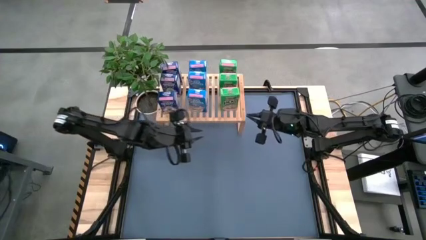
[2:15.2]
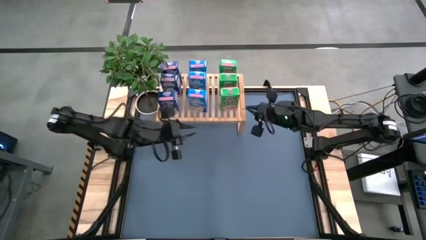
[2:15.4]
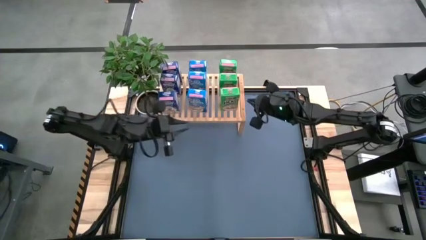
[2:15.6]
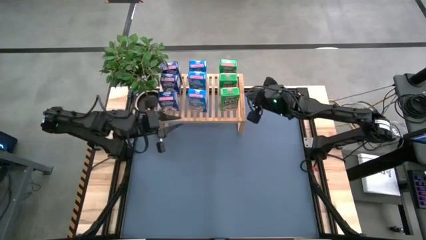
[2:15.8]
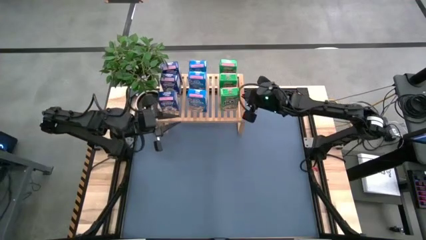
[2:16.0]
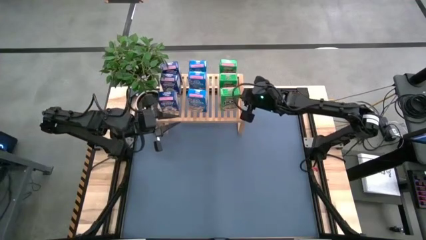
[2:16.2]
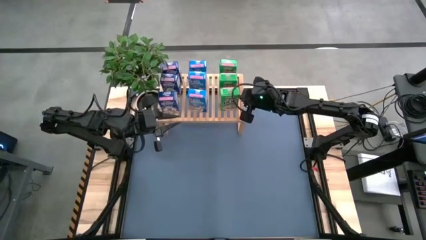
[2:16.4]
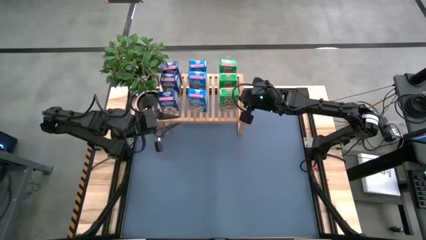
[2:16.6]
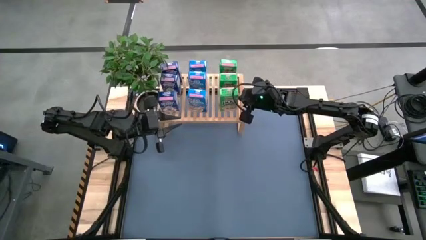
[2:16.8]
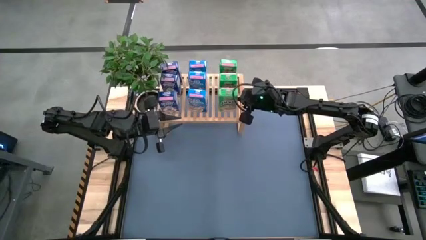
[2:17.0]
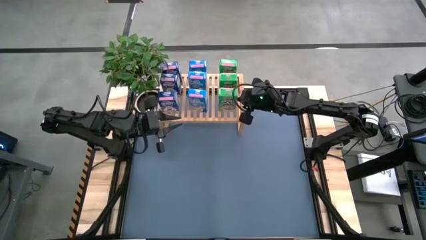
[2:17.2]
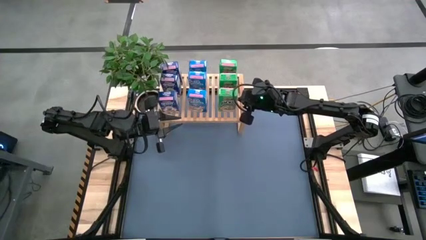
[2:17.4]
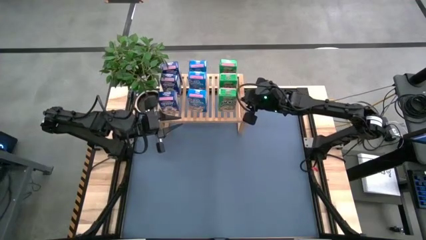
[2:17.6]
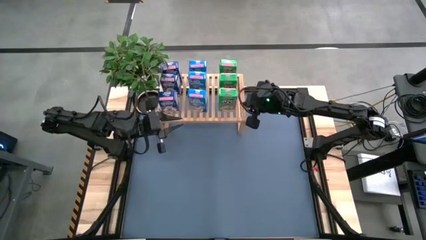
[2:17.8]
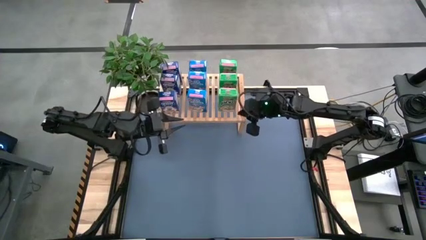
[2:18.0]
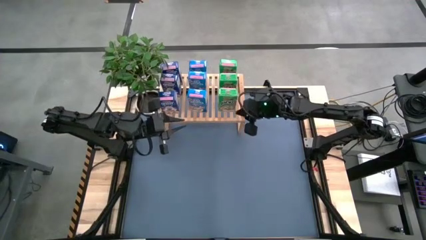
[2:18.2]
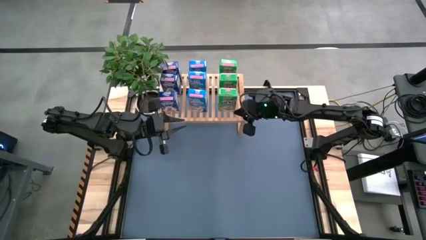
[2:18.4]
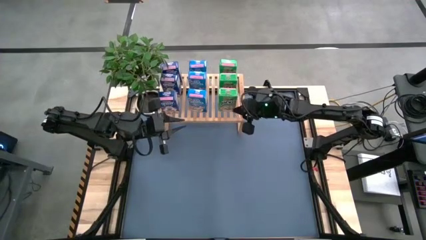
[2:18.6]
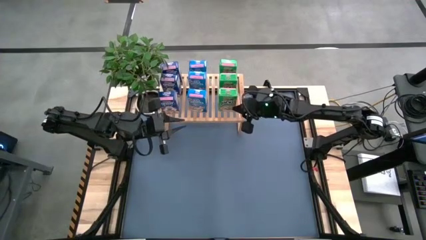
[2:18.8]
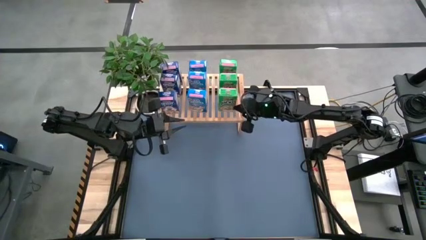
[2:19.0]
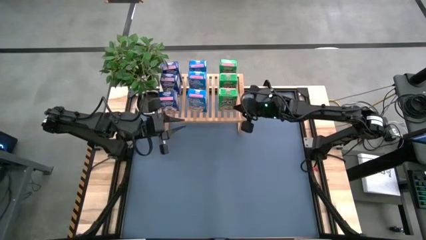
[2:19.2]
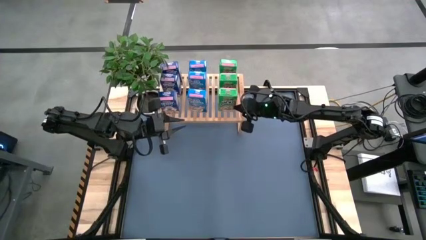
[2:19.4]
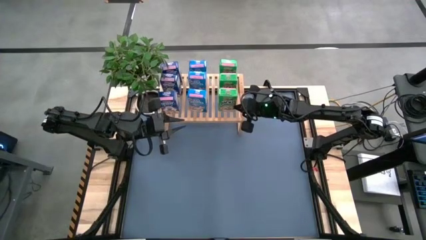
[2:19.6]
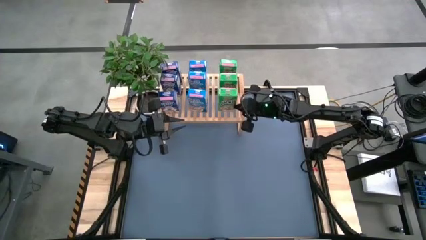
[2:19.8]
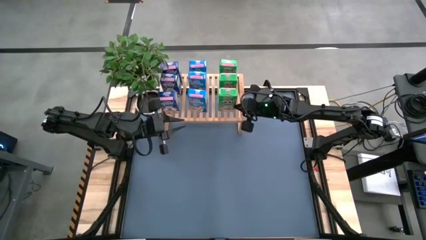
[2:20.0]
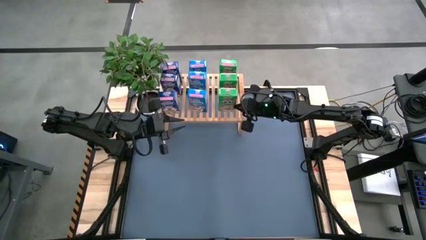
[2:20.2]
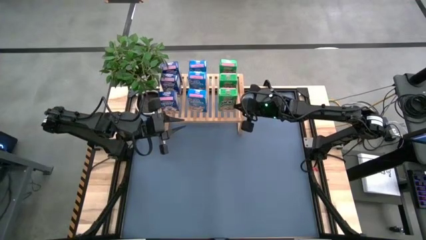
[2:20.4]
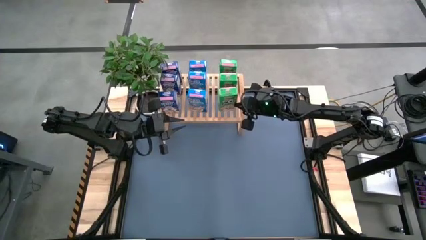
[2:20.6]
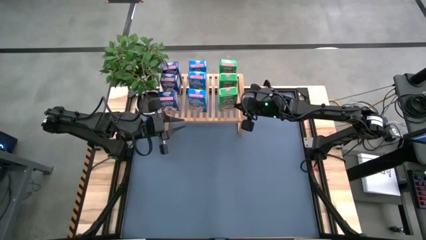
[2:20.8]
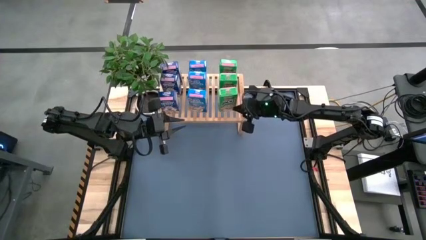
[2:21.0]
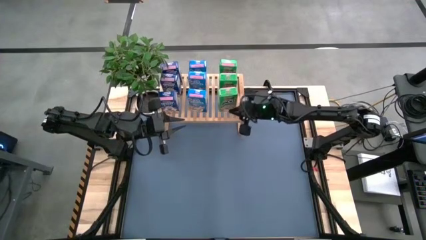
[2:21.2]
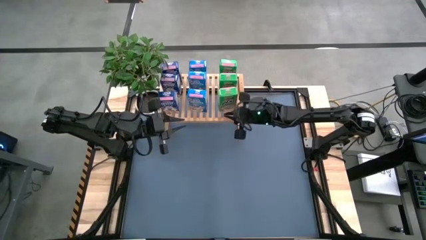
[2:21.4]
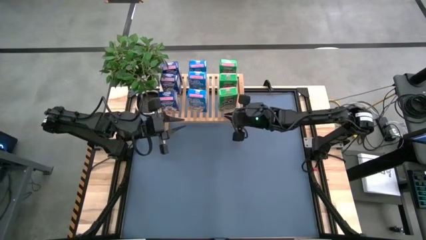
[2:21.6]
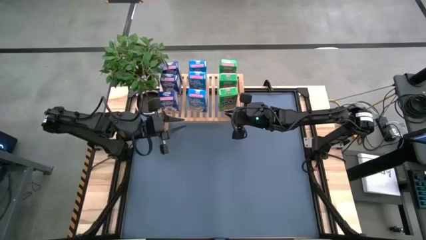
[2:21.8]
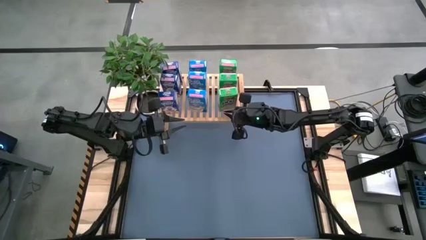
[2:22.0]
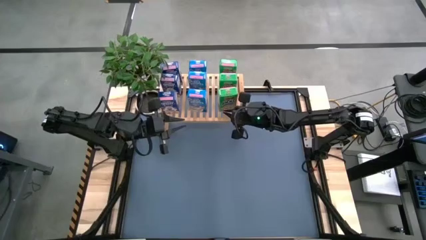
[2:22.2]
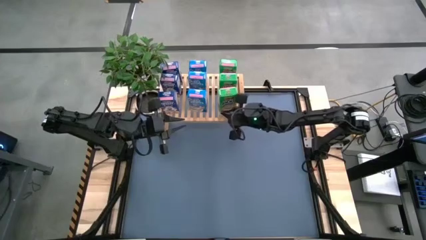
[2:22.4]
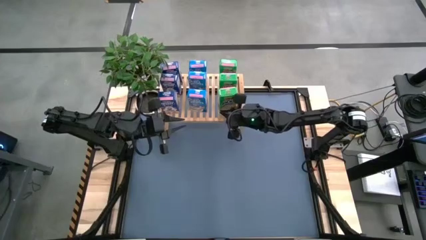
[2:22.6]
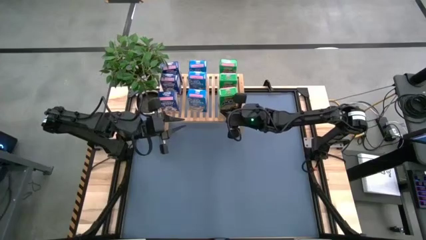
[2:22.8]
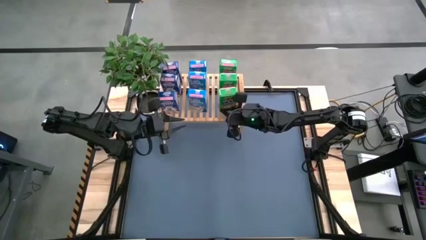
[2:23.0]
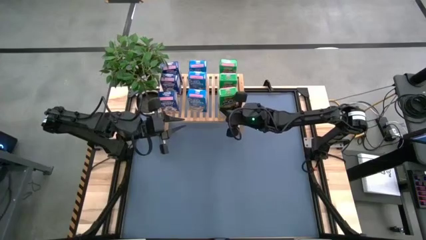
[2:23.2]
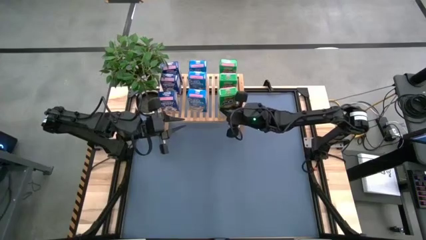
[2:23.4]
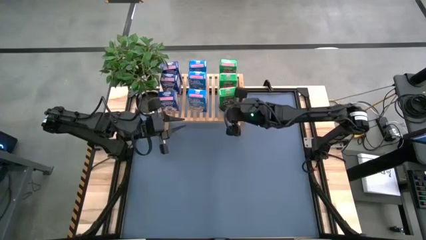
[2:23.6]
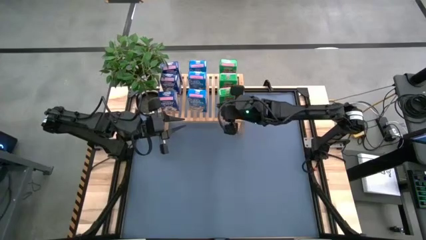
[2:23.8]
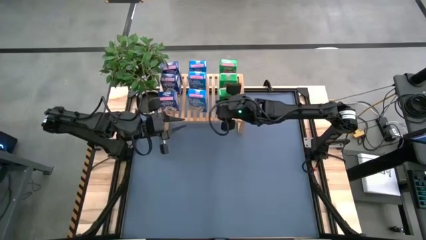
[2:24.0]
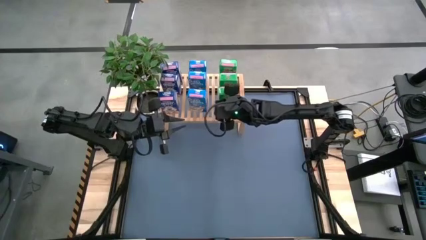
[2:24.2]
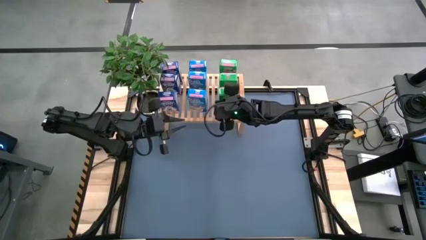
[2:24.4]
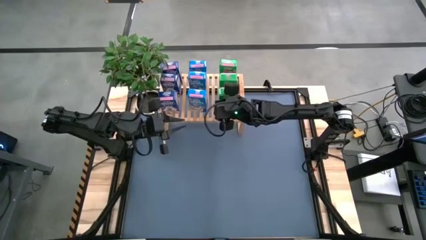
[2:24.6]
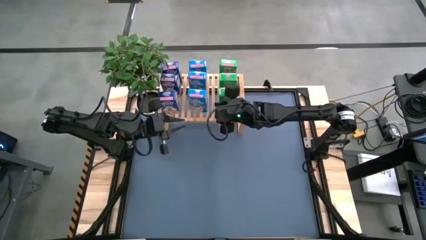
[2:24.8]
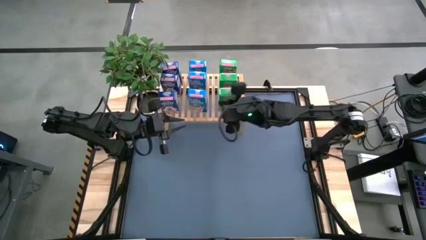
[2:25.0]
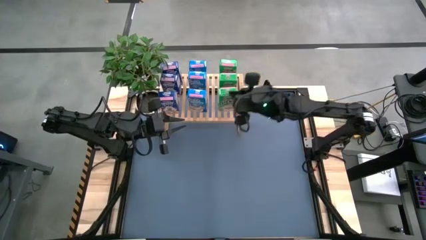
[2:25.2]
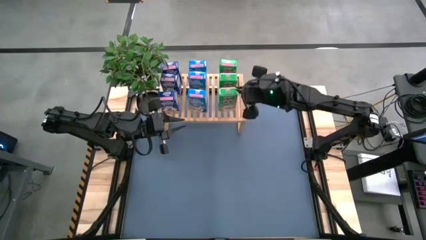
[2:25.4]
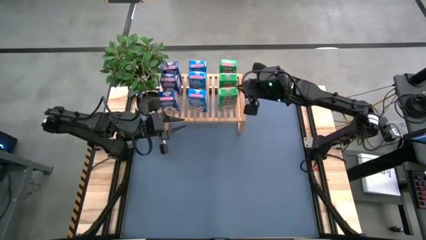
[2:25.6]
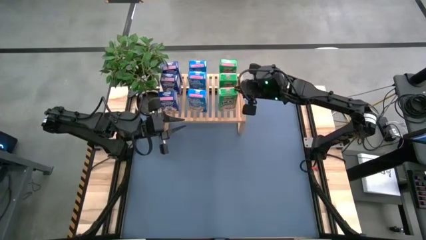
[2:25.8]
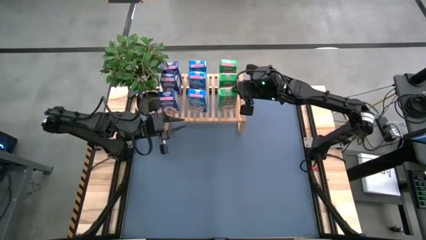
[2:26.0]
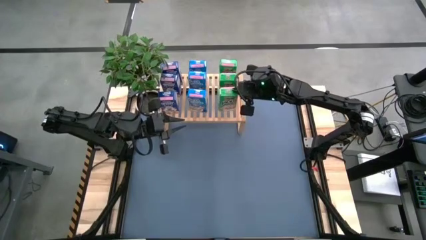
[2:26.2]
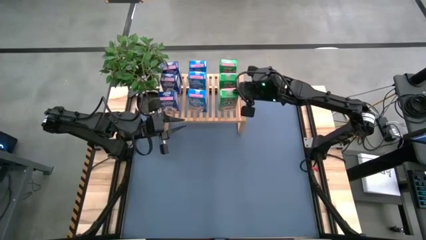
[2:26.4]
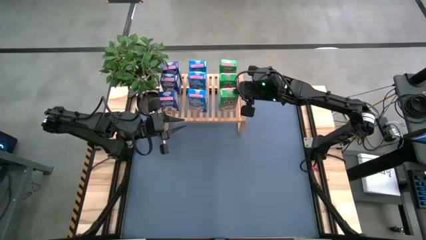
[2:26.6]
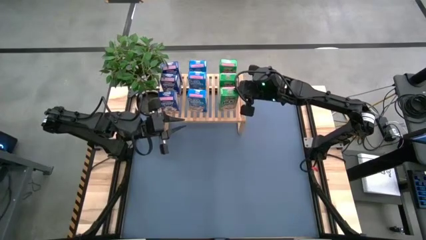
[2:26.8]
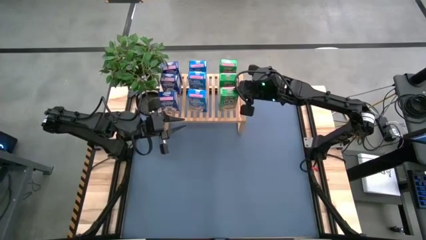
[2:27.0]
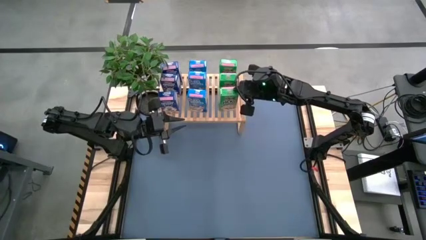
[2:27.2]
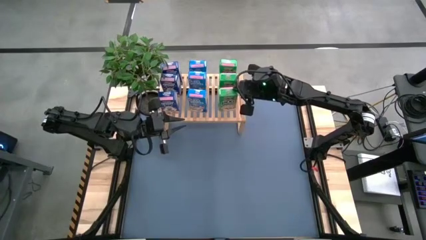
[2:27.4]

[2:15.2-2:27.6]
Task: Stack cereal on shelf
Put the green cereal box on the shelf aligned with the green cereal boxes

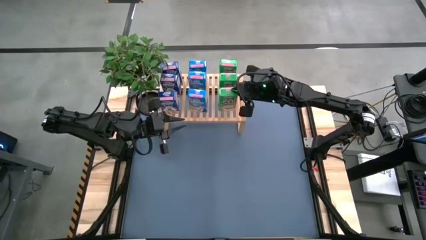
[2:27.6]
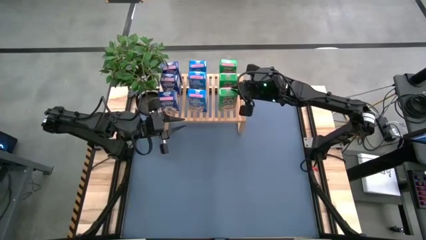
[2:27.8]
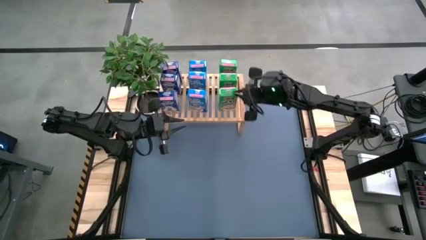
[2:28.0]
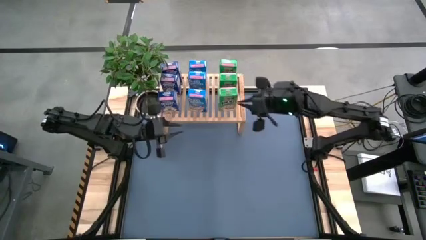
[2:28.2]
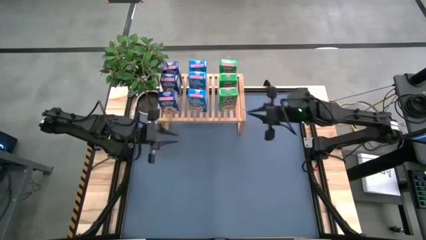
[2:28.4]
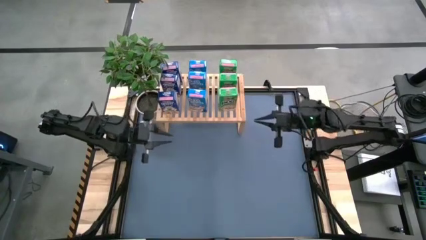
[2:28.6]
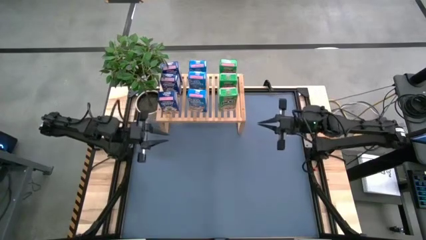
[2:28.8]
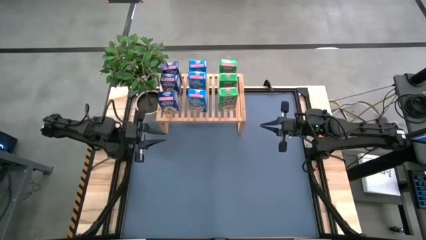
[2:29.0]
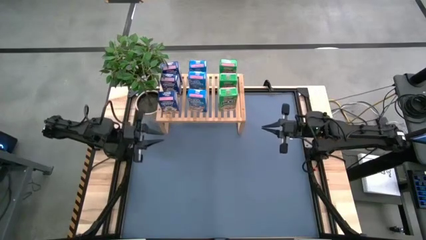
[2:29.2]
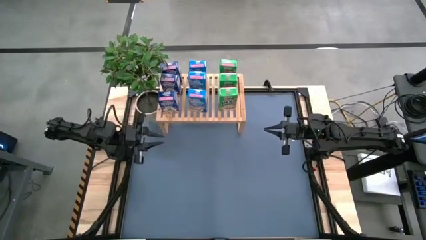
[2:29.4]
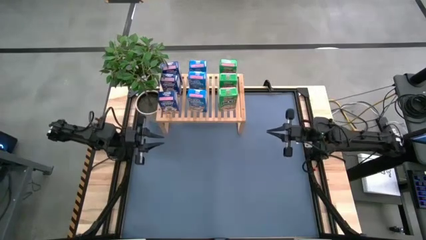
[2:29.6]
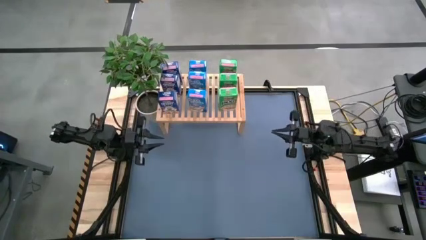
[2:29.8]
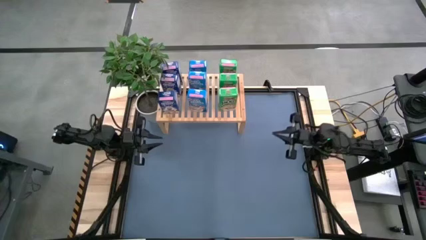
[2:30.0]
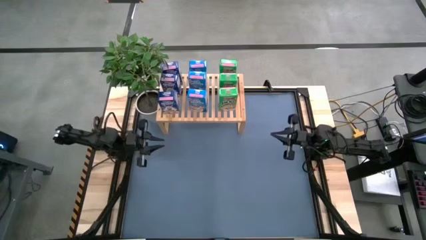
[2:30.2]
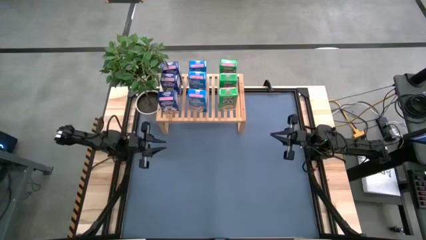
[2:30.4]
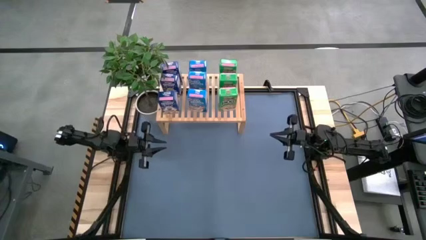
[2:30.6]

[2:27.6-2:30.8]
Return to Home Position
